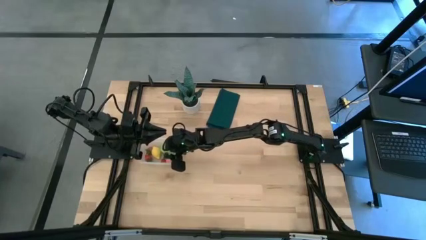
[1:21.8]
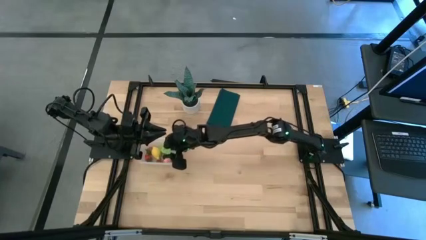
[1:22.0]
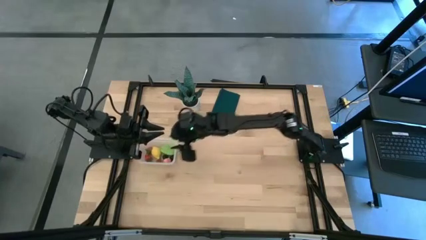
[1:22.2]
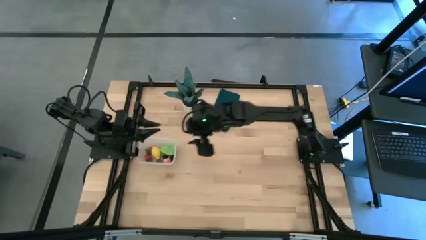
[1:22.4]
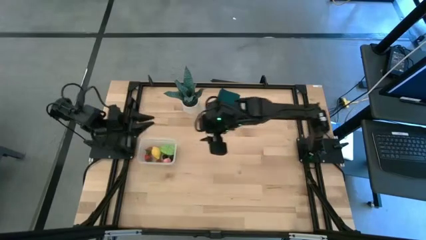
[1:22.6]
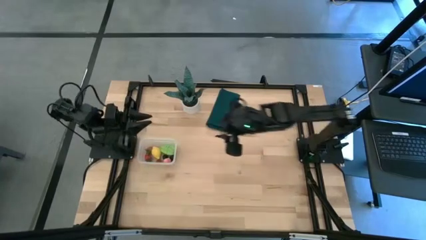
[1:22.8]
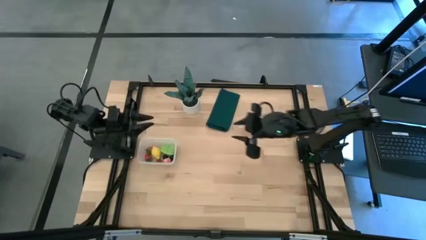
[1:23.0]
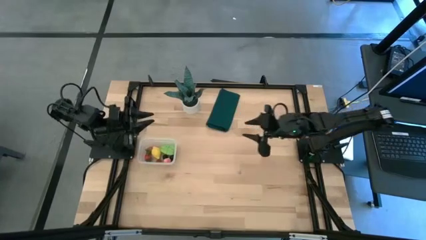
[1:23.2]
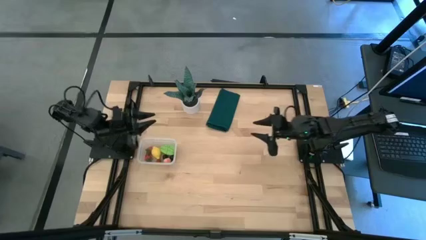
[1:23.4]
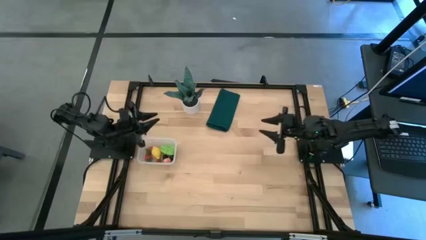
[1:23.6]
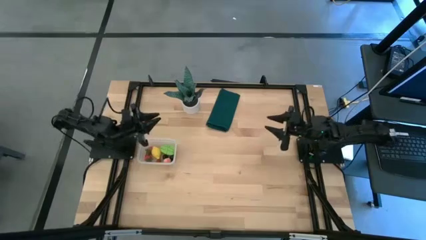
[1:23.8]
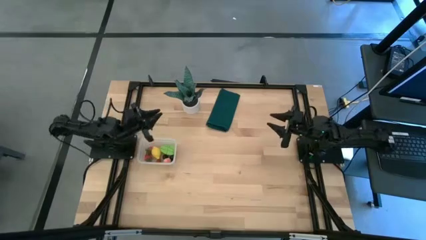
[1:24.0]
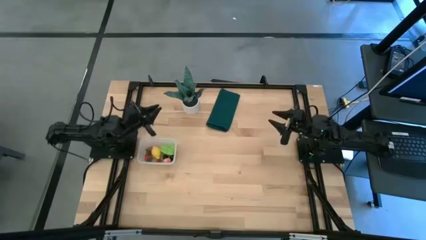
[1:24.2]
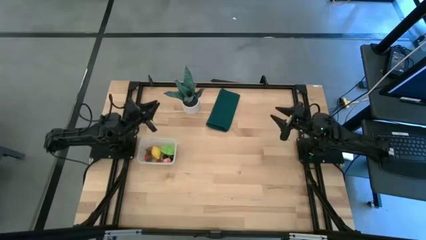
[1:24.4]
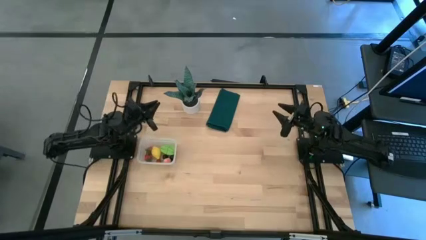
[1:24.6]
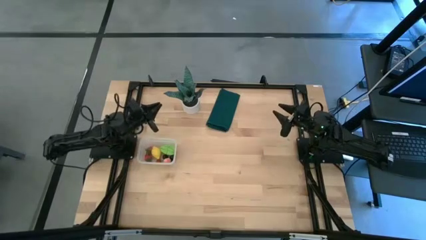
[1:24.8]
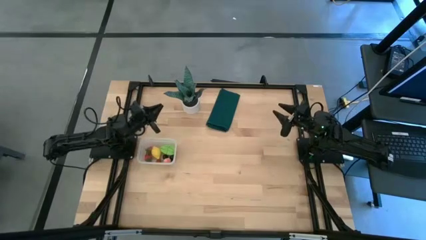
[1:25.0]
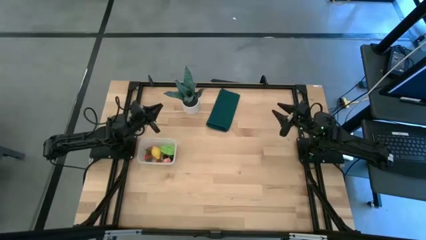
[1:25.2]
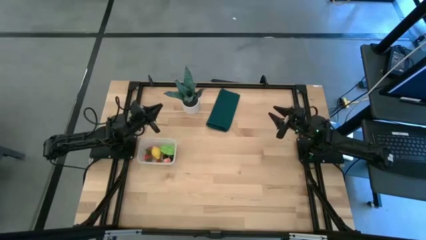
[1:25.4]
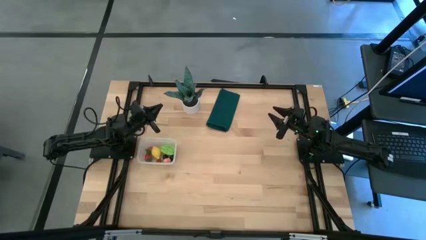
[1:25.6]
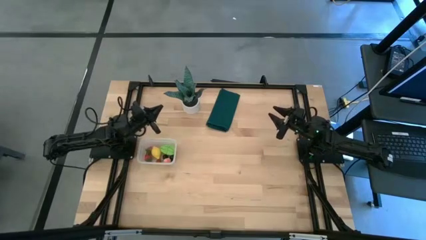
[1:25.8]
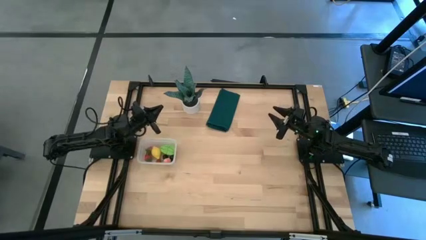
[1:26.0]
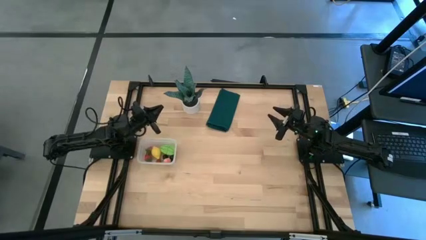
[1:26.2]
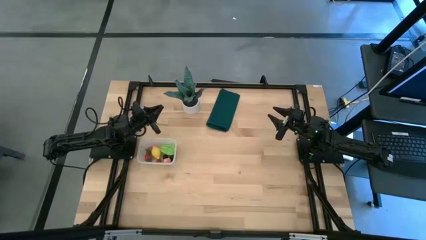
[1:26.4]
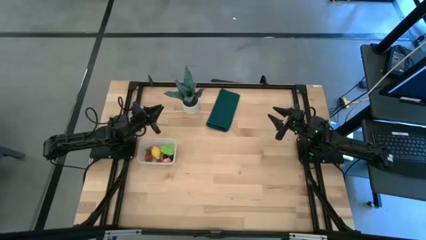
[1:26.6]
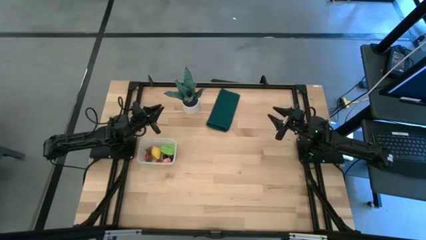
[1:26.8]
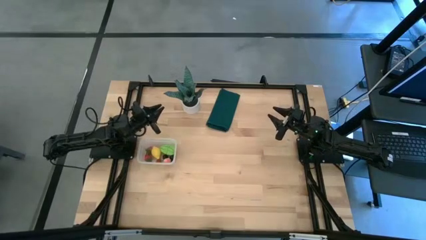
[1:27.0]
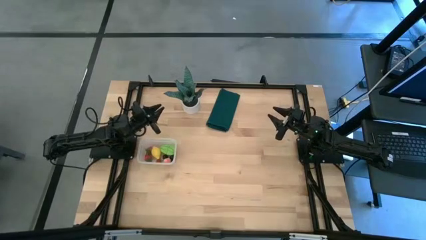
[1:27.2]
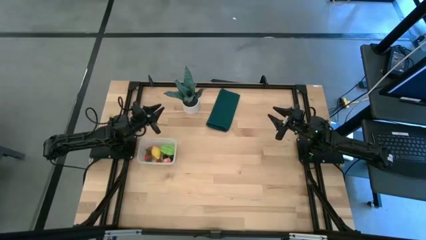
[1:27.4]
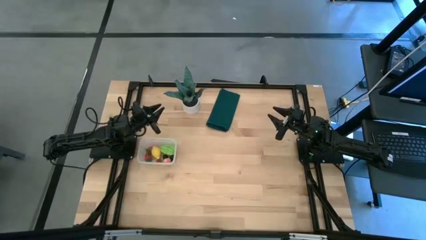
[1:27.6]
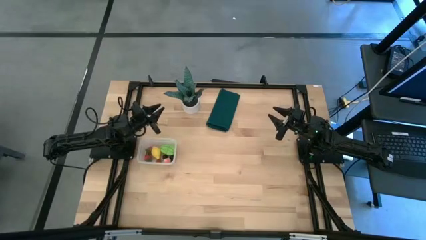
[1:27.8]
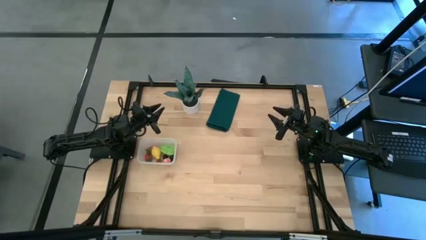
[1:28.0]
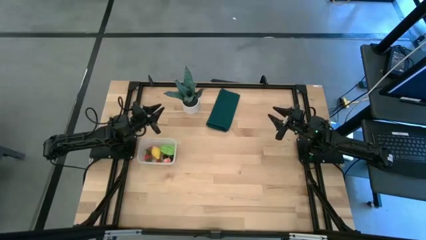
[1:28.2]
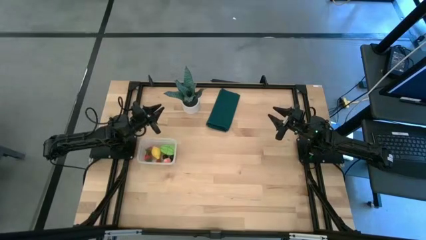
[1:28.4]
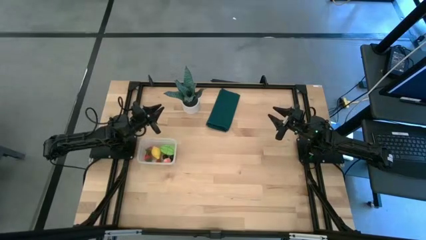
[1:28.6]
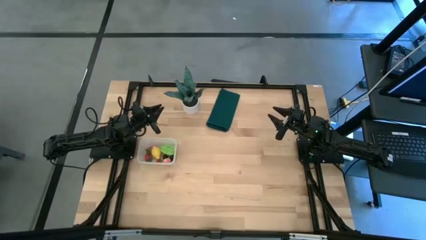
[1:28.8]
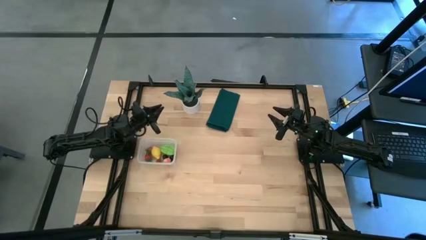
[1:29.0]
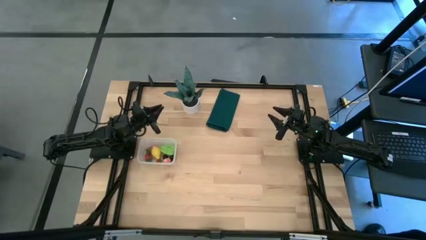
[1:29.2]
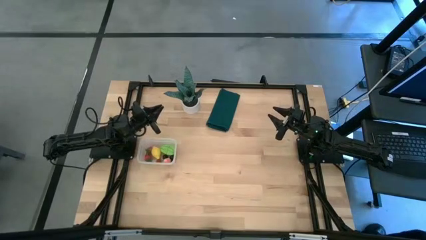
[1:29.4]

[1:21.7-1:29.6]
Task: Pick and placing Produce into tupperware
Return to Home Position

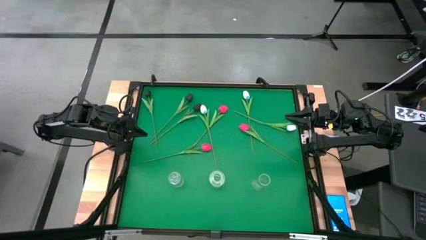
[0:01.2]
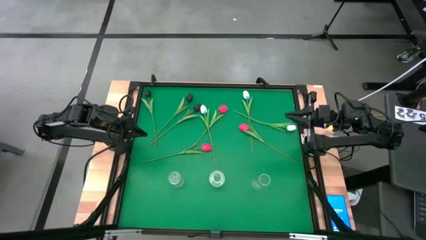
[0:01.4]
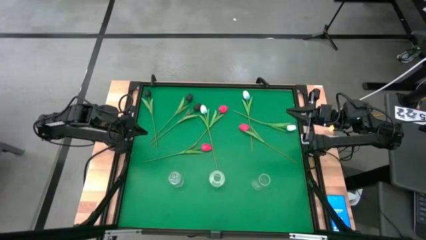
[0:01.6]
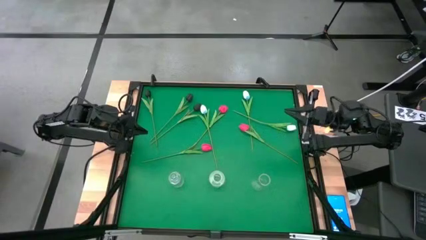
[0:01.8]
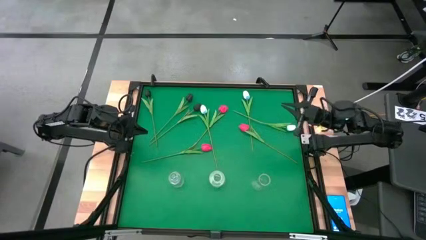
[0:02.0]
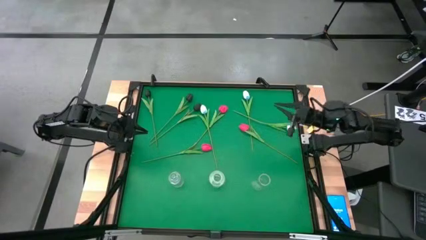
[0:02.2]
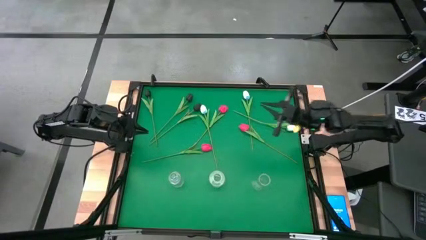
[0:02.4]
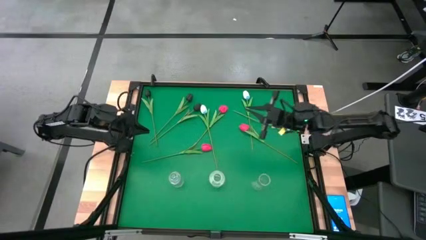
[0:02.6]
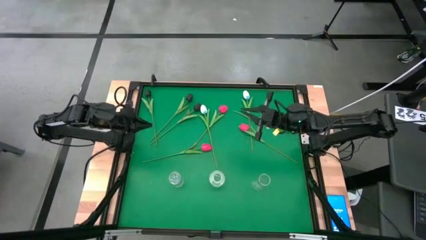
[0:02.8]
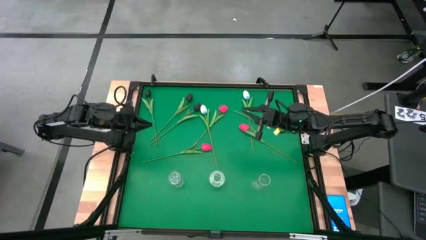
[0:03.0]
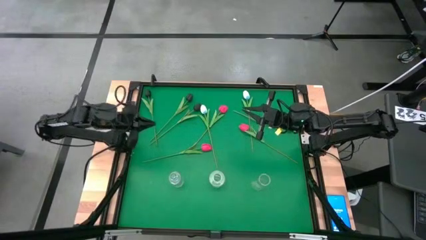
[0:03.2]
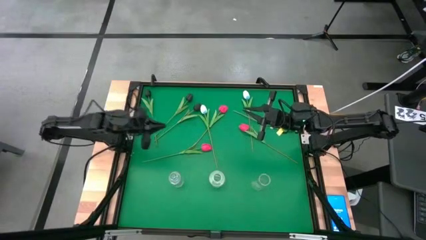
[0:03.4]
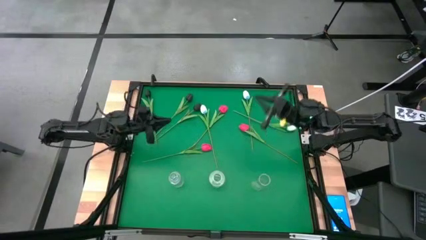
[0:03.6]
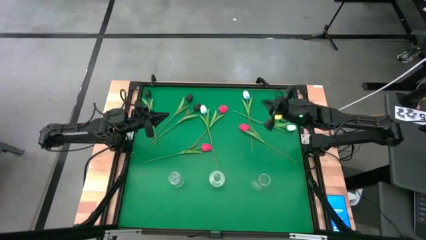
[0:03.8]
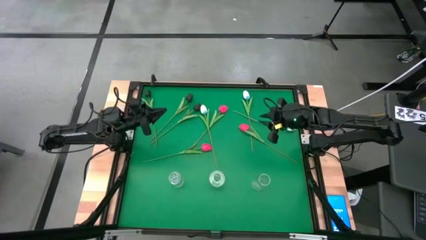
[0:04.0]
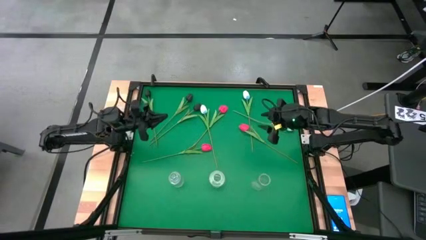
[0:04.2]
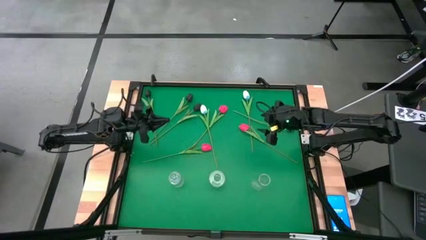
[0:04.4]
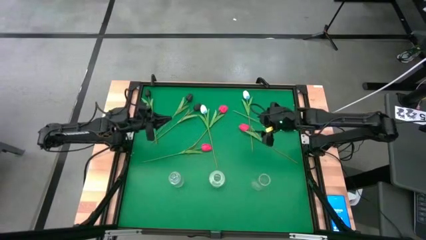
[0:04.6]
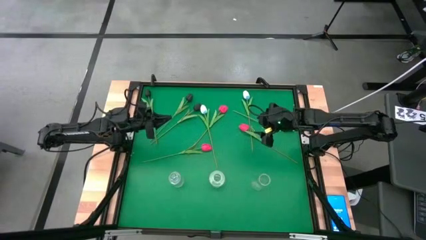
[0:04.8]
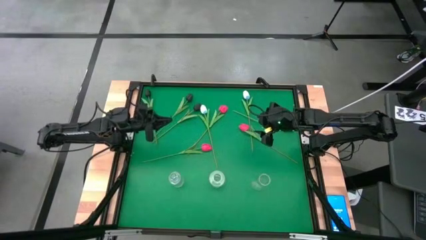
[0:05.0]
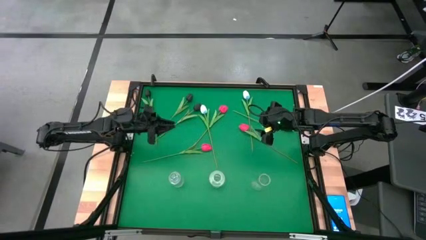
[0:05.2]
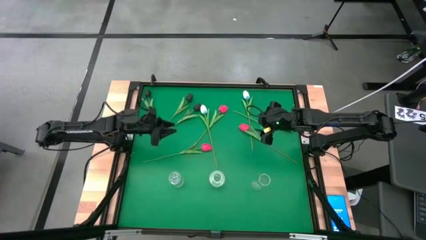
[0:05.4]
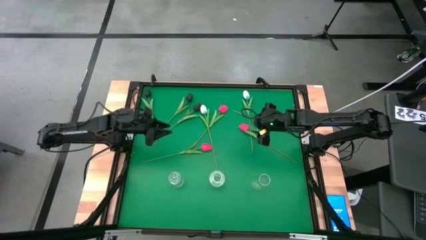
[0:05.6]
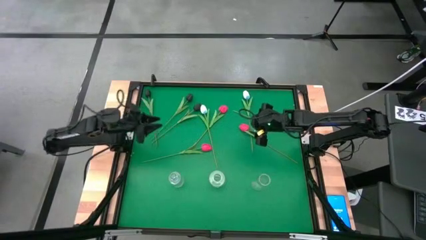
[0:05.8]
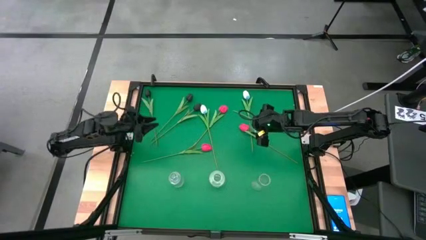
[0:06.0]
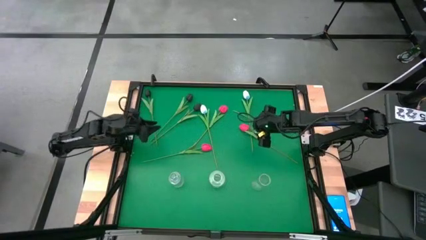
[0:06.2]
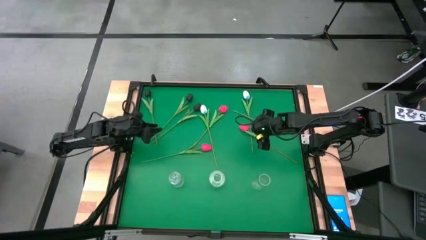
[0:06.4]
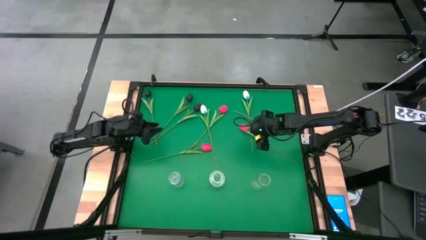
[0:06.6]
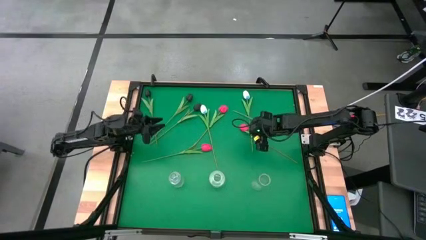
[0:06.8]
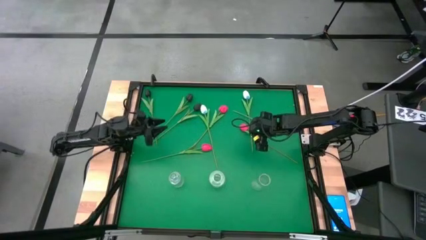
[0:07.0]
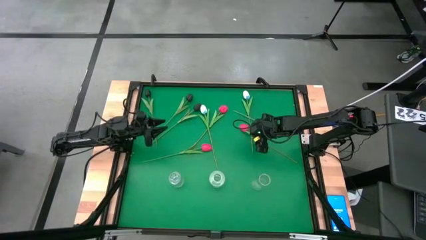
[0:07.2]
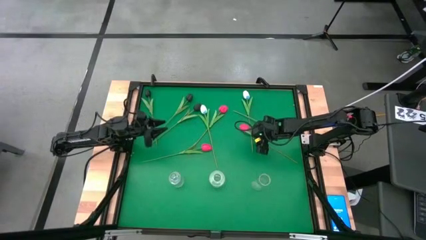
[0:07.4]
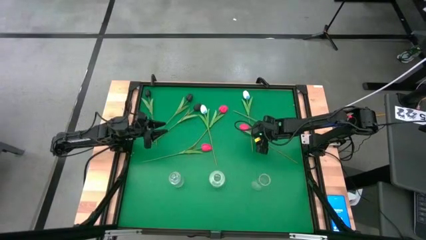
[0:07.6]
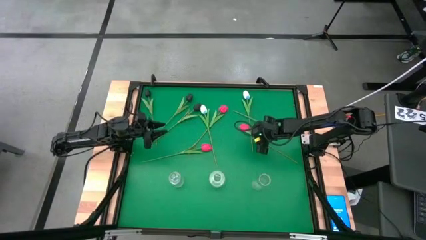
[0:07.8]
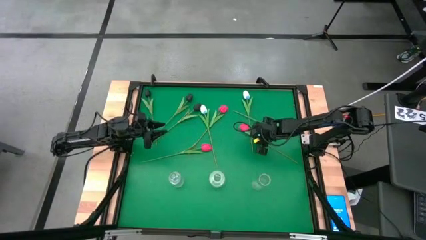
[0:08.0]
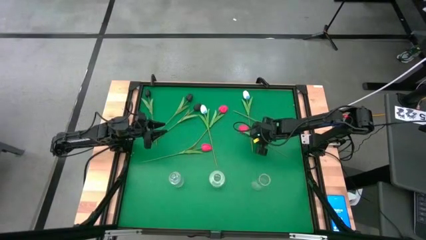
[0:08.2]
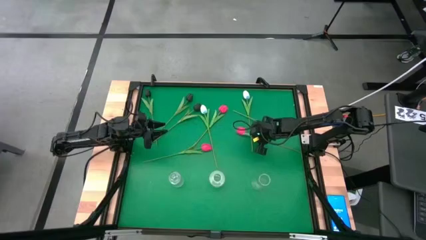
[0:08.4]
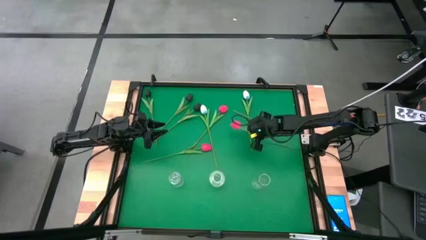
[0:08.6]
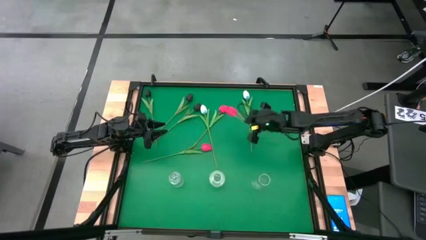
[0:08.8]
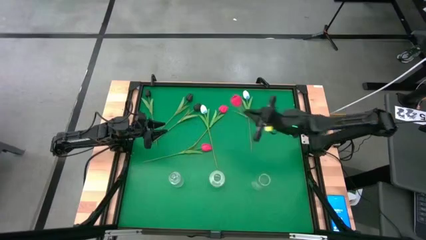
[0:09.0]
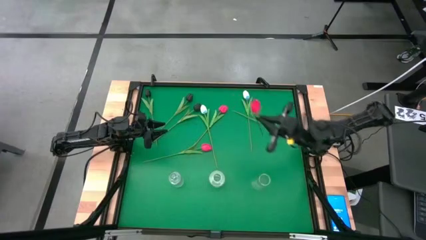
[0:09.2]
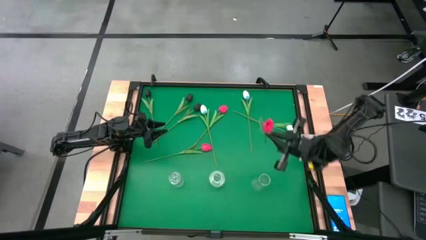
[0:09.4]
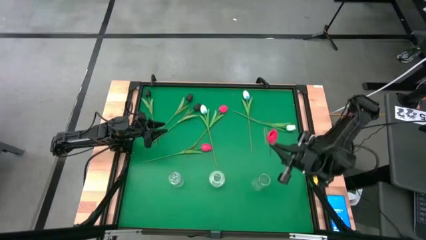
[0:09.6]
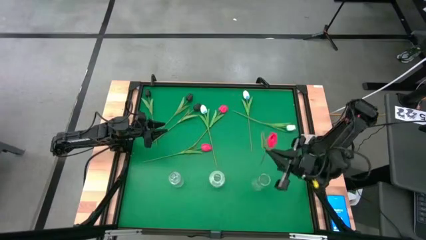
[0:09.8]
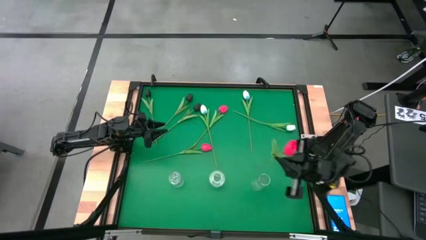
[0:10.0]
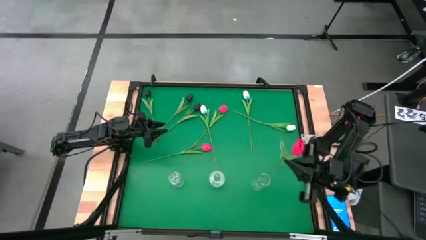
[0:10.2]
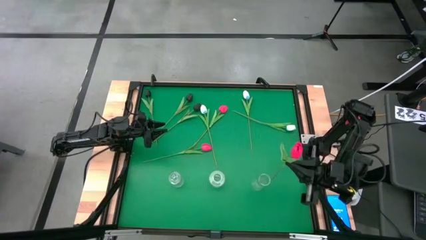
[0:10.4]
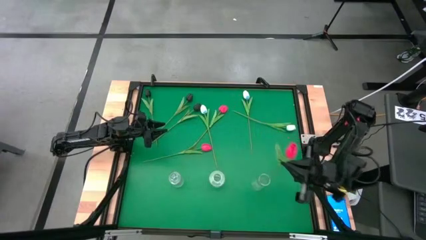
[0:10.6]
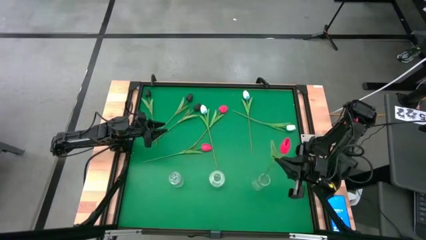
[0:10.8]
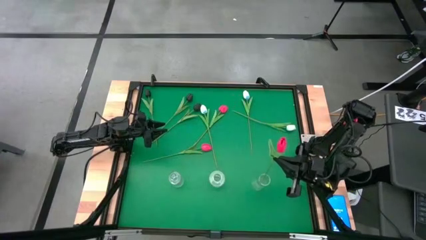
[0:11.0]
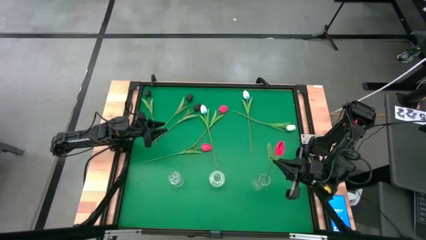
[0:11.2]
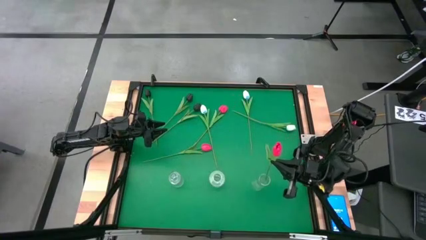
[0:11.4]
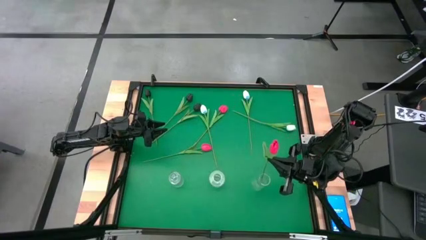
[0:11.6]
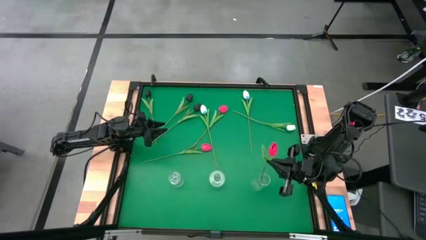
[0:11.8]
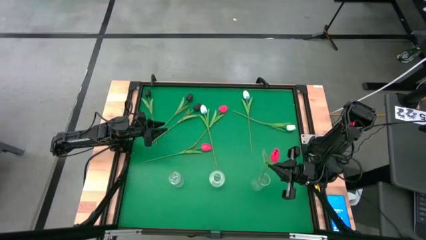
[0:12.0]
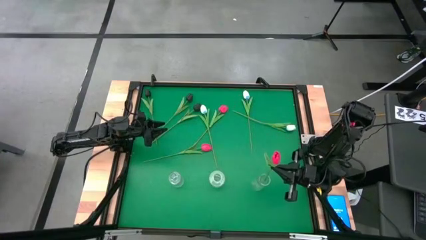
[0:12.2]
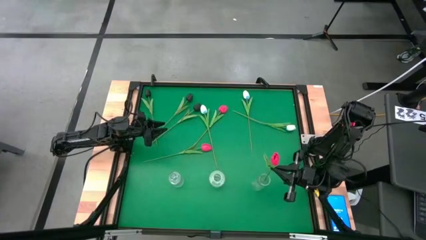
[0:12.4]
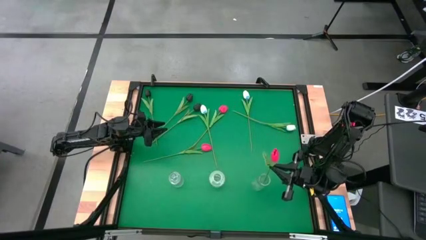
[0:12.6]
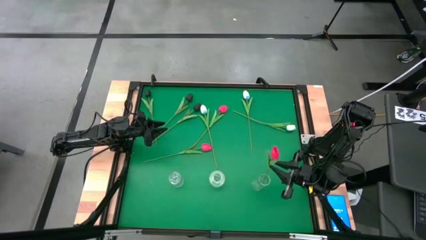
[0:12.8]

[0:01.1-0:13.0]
Task: Sort flowers into vase by color
Put the middle right pink tulip into the right transparent vase
